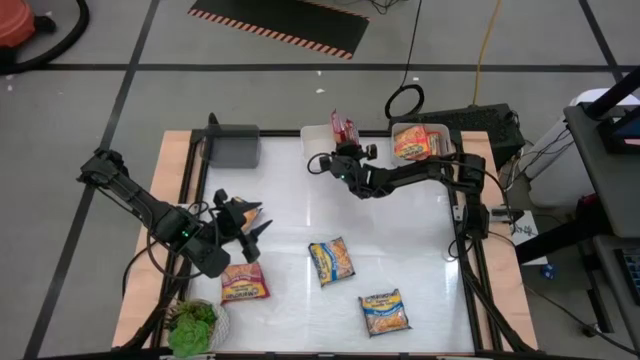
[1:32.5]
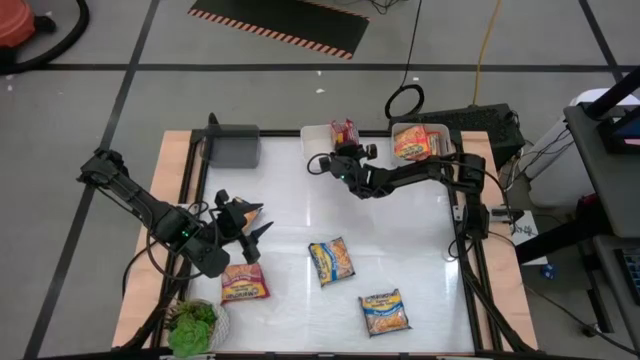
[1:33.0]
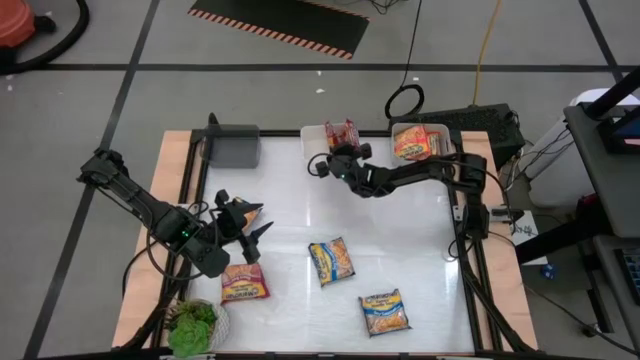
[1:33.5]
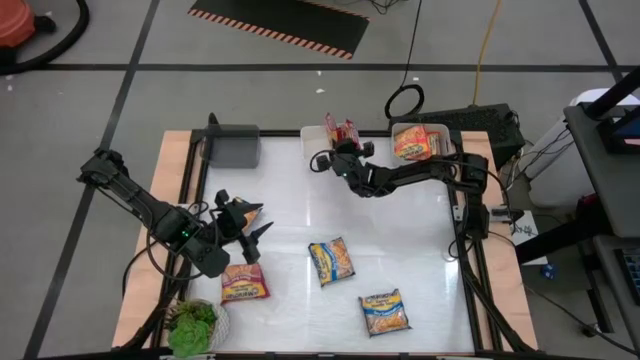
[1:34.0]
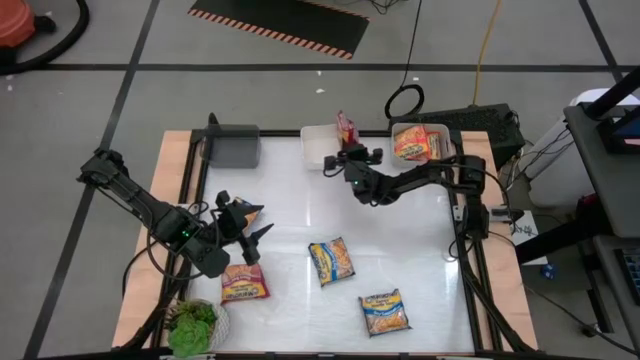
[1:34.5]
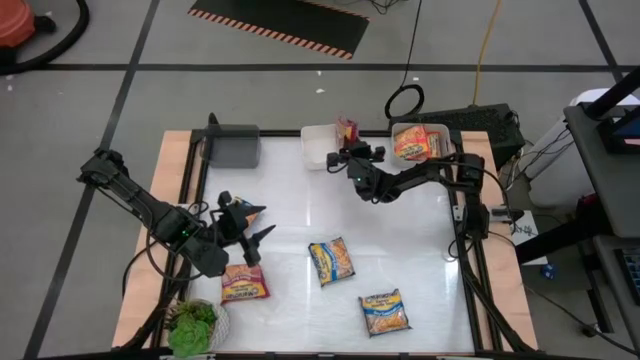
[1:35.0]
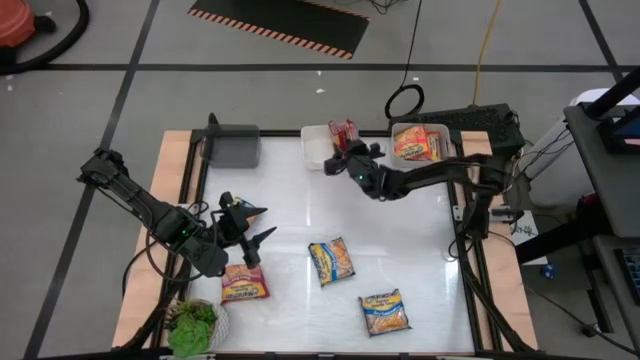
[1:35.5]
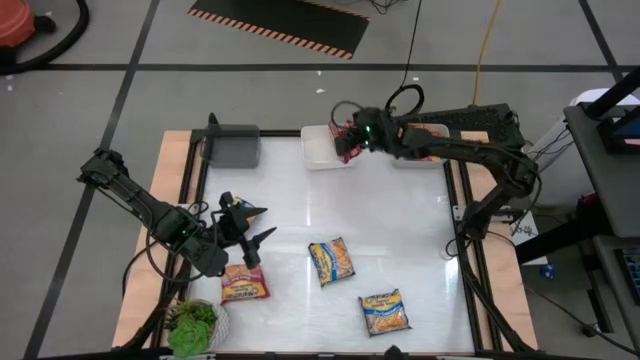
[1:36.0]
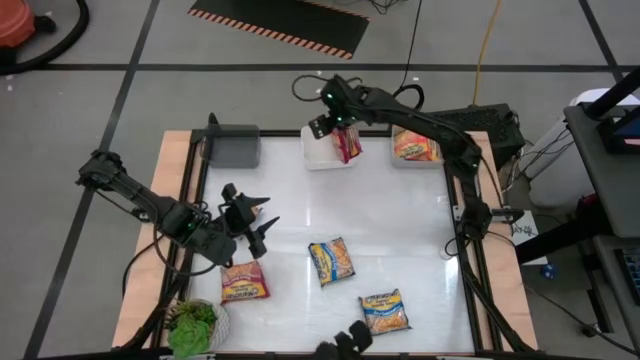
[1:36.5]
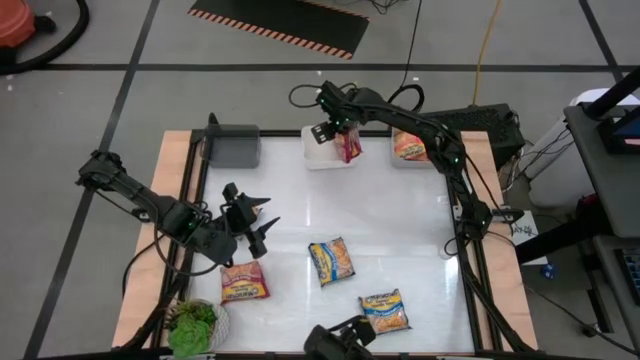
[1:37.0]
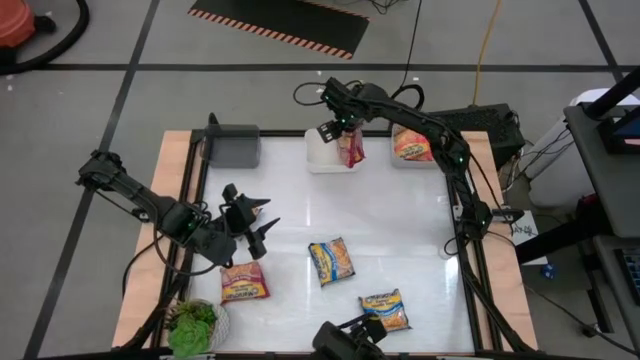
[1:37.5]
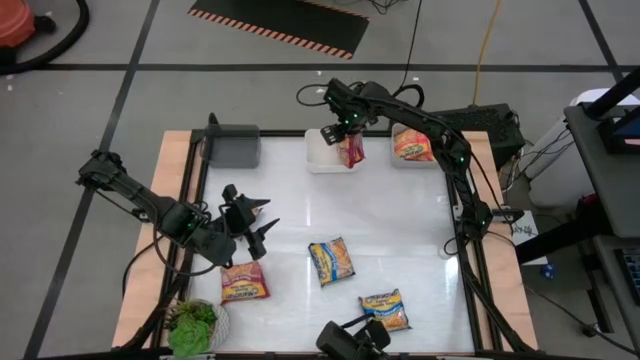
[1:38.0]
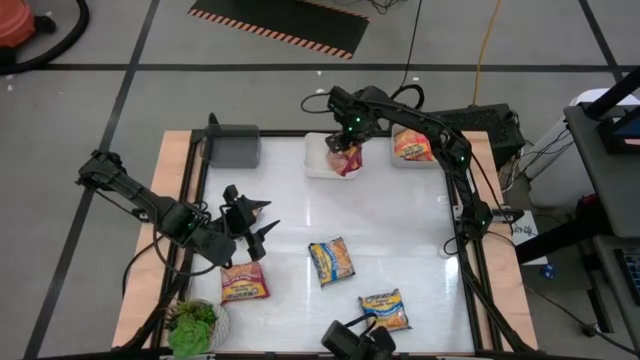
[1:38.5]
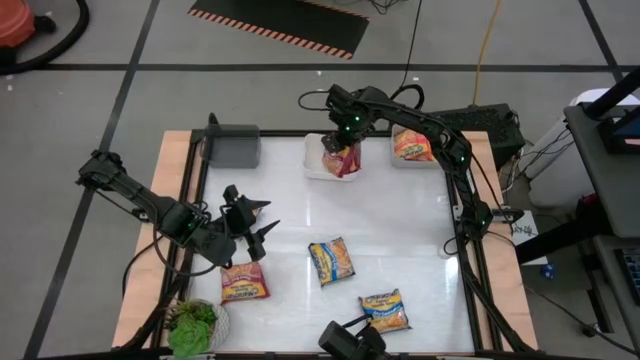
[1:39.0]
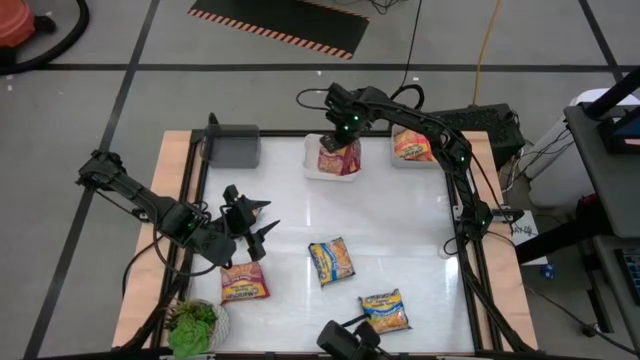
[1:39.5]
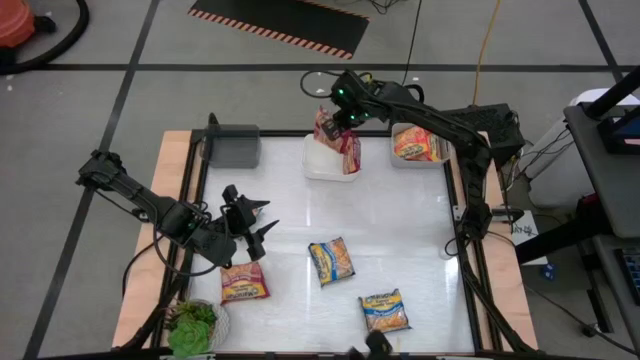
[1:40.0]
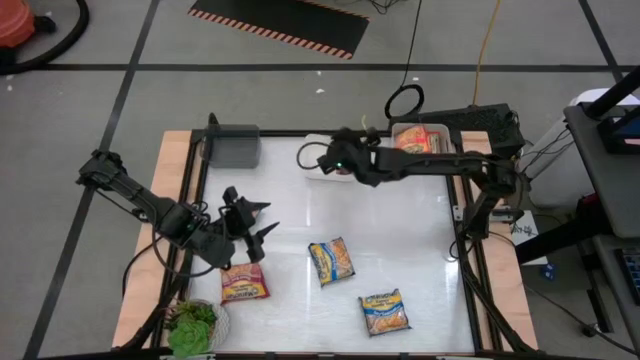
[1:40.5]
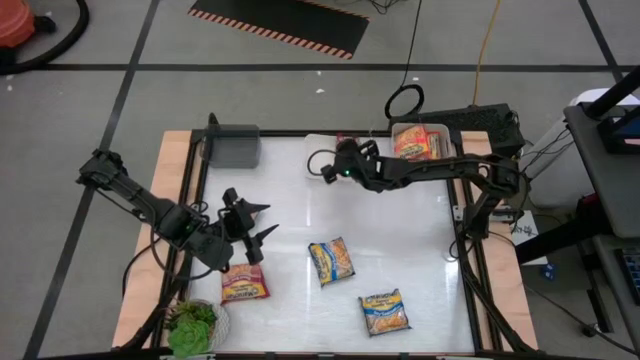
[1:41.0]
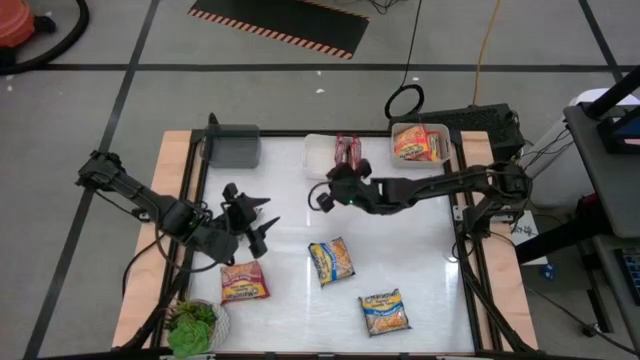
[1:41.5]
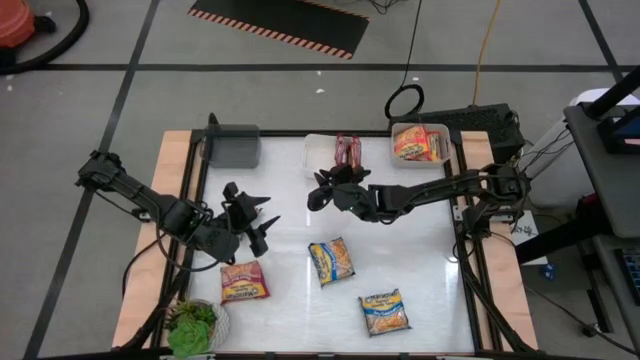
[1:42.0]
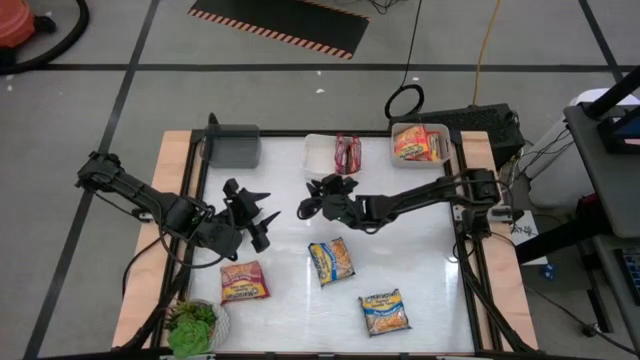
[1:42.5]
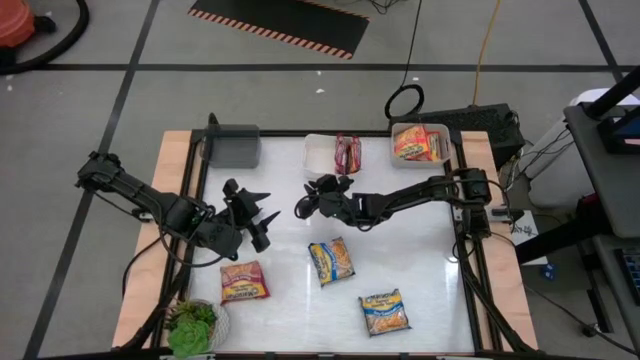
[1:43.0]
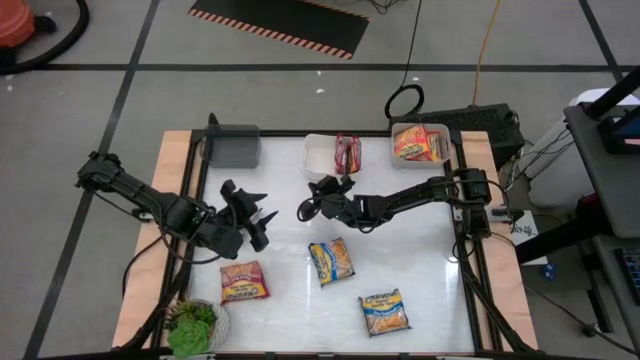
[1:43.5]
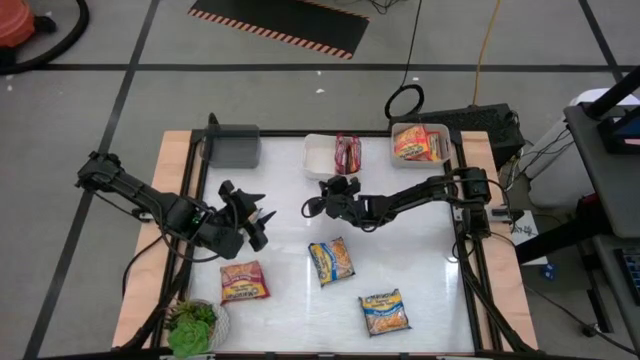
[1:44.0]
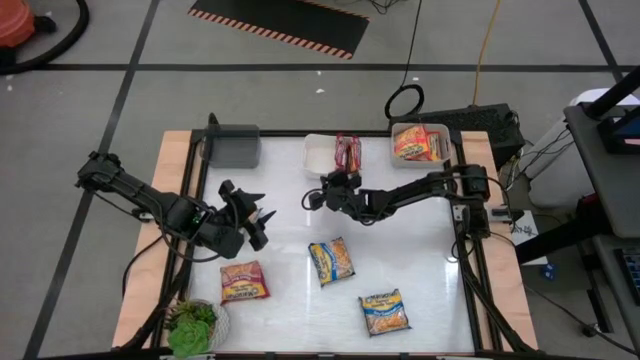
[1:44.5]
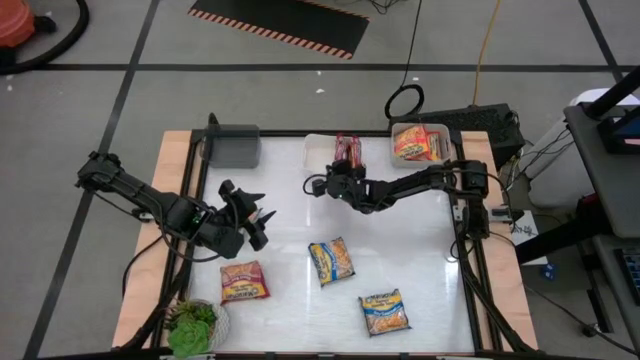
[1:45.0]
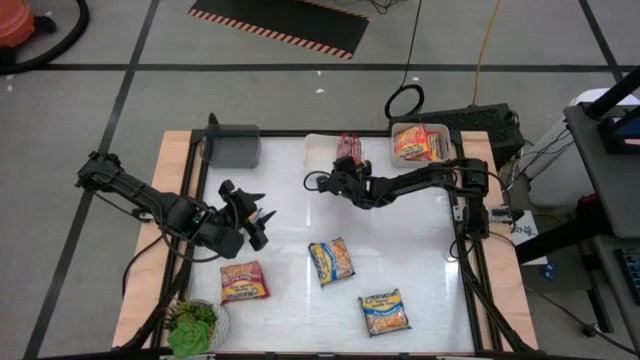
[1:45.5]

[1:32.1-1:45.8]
Task: Sort Maruchan noodles
Put the right red noodle pack into the white bin
